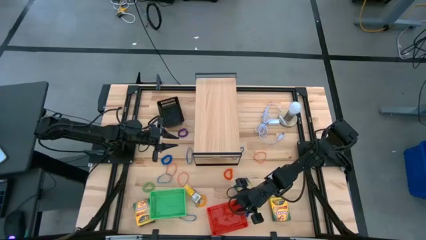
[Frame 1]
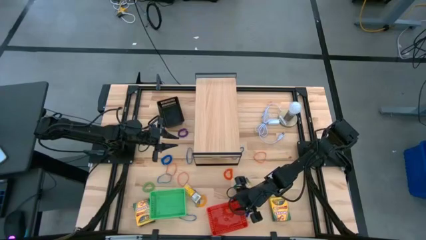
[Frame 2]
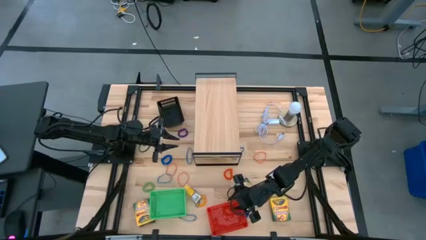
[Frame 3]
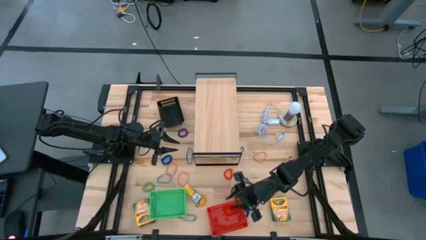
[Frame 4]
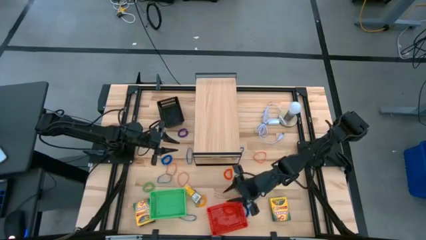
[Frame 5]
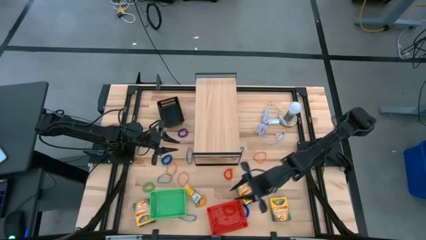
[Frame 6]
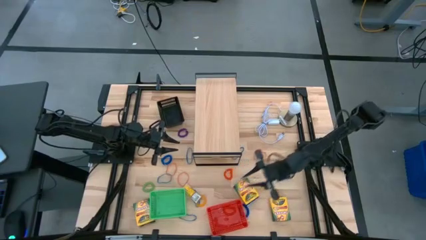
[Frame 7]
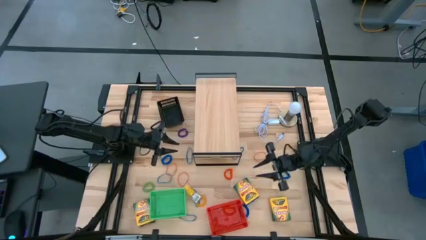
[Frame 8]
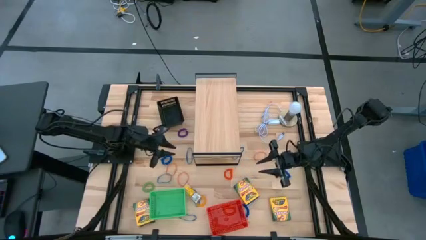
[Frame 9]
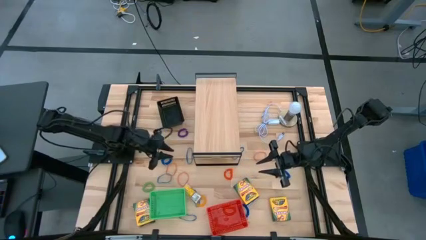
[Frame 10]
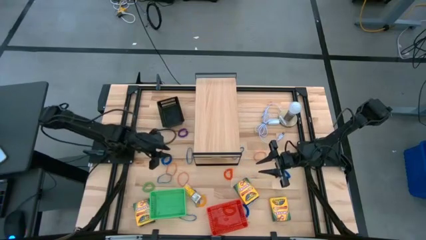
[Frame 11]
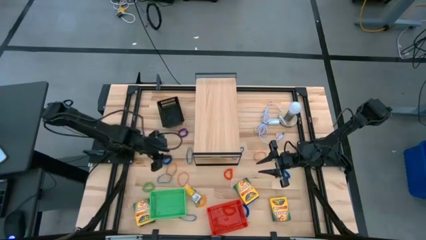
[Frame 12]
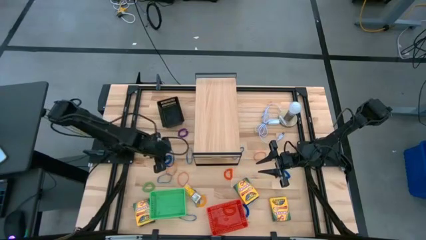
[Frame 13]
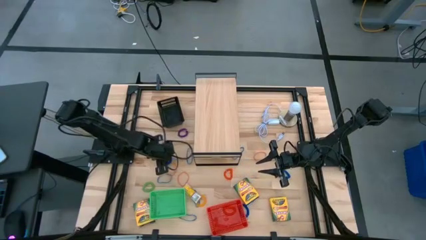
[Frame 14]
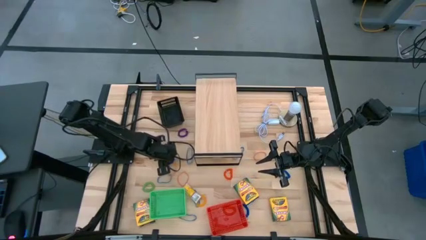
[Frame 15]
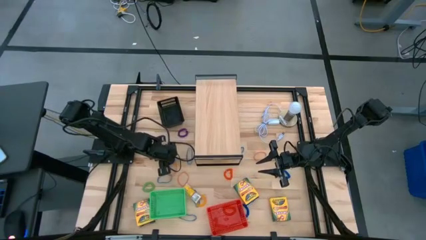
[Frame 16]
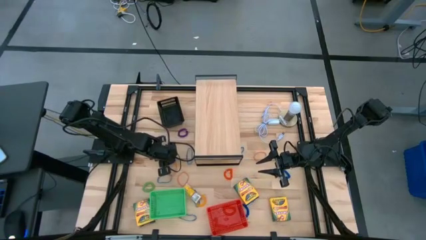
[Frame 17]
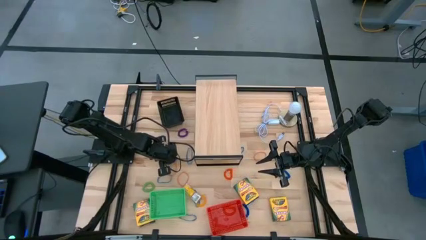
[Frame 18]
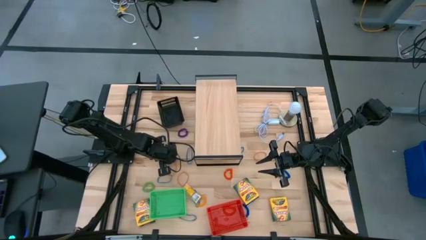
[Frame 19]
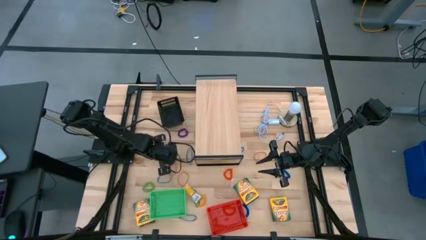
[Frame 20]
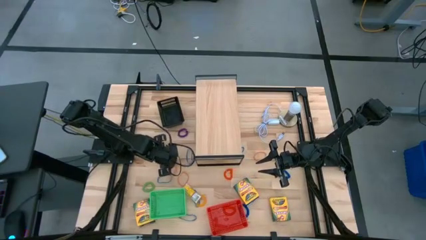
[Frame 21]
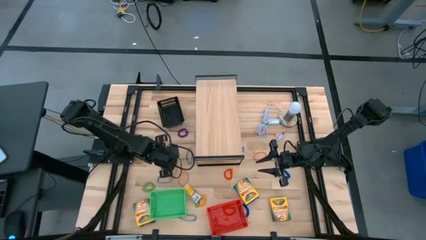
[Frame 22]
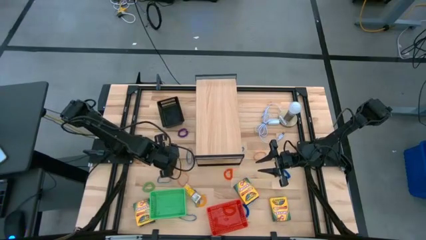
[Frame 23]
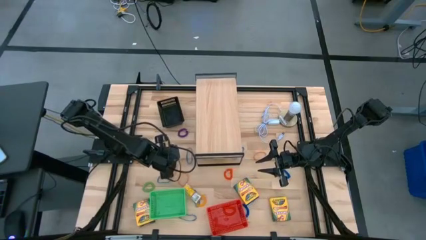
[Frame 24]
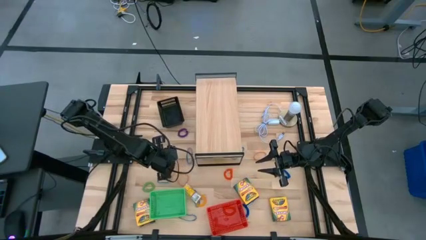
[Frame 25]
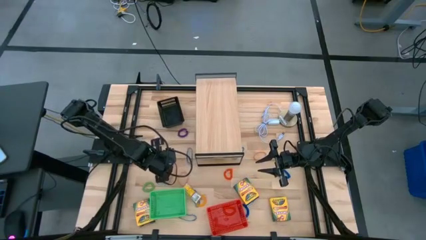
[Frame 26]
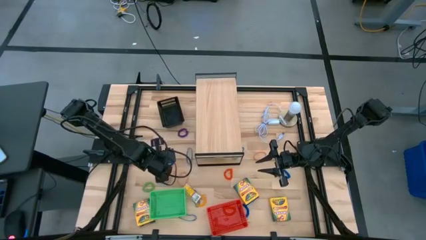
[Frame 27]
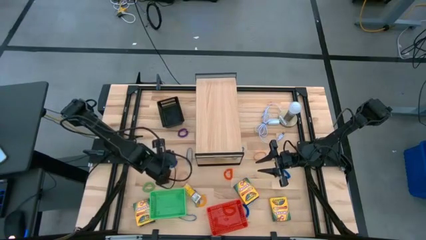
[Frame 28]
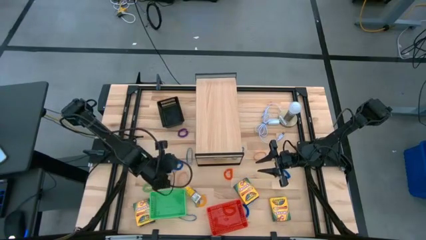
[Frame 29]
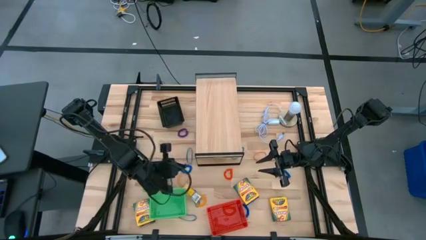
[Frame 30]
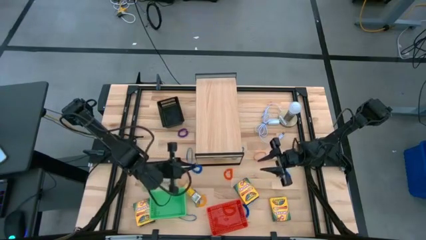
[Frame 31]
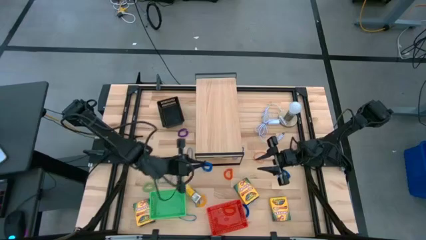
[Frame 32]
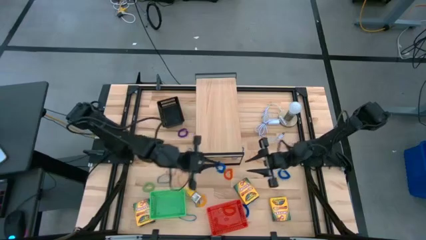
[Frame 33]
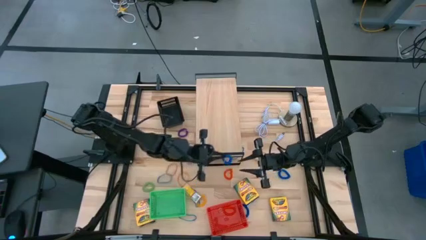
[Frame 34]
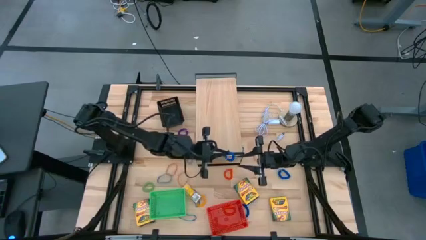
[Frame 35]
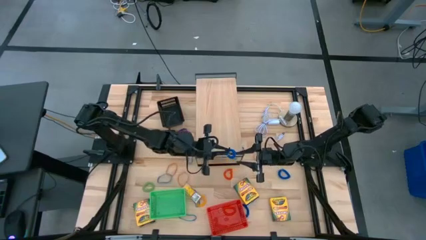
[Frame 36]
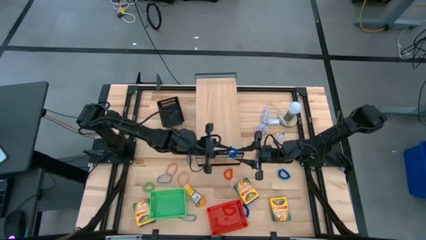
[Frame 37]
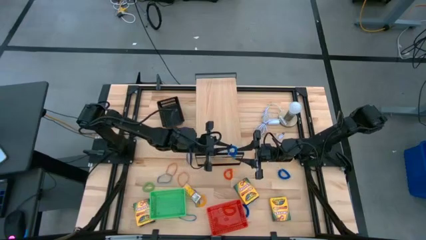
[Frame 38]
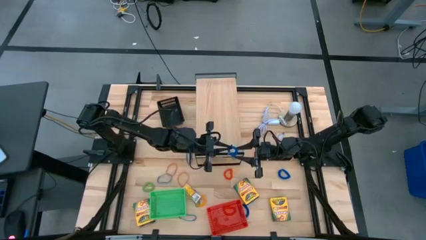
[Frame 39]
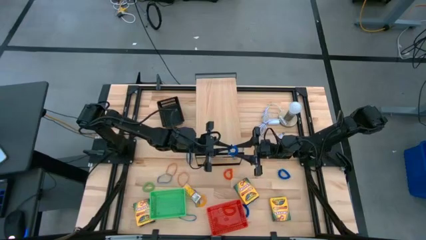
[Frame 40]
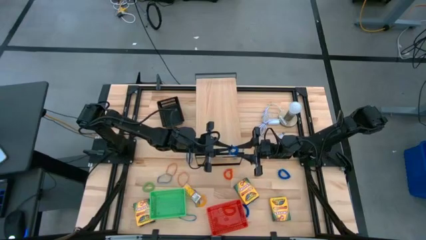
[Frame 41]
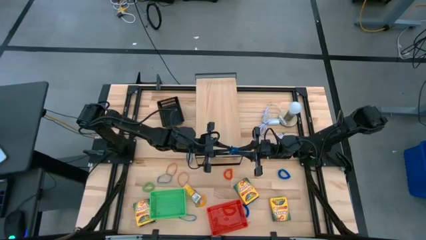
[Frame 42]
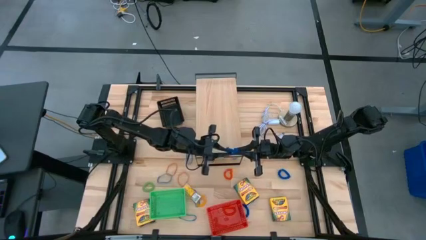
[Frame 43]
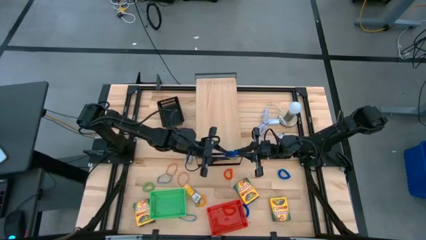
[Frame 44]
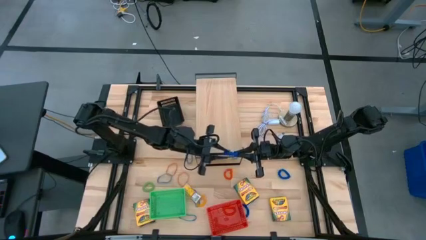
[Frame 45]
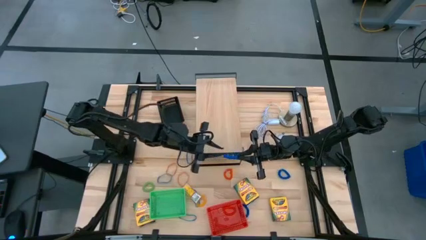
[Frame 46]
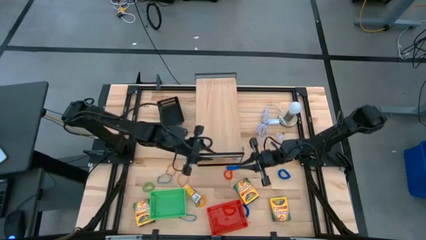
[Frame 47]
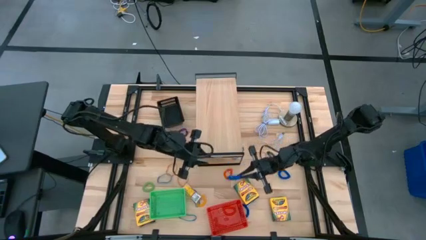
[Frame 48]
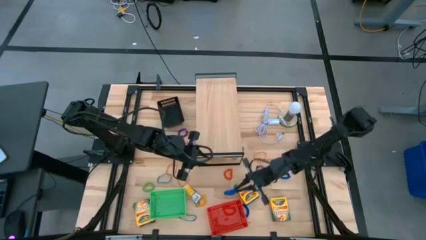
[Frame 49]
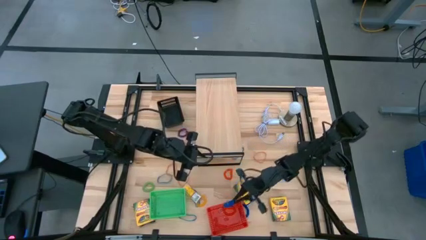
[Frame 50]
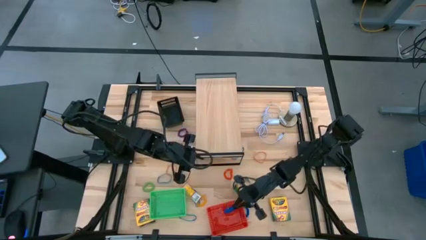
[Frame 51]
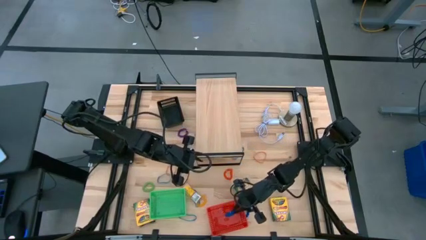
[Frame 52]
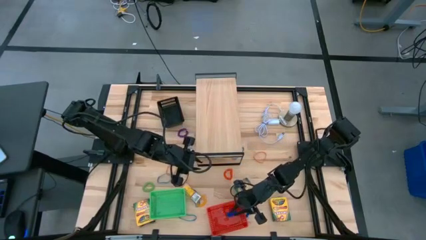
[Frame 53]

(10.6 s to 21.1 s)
Task: Pick & Place Office Desk Supplies
Put the blue spring keychain into the red basket

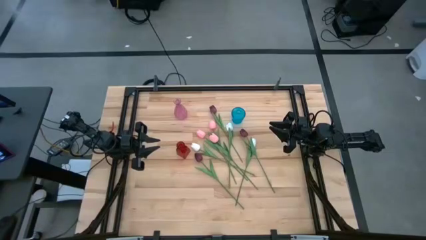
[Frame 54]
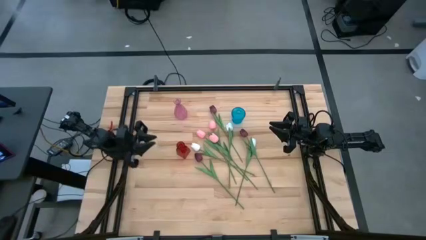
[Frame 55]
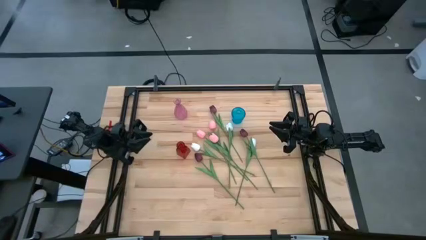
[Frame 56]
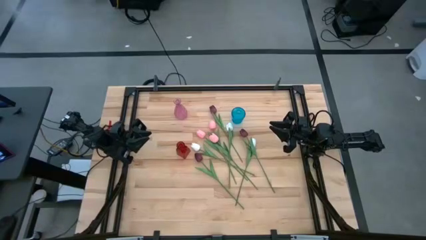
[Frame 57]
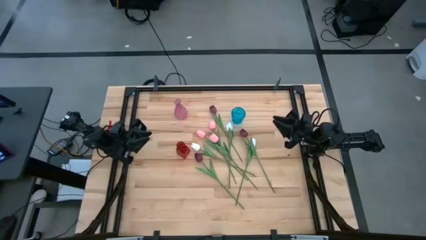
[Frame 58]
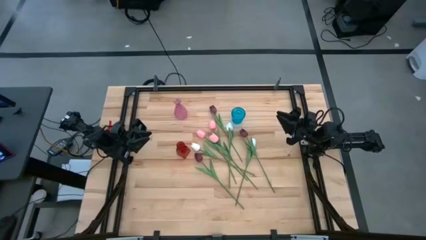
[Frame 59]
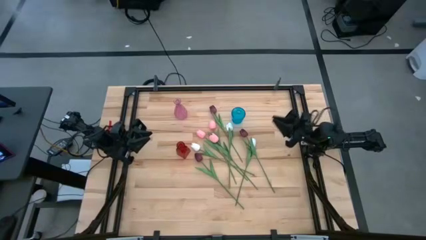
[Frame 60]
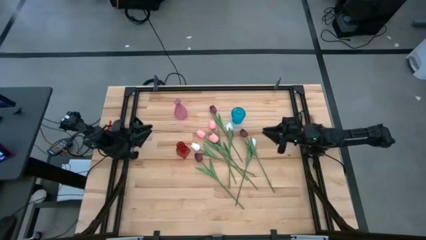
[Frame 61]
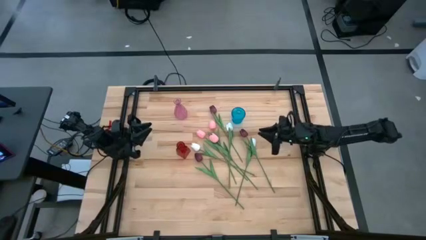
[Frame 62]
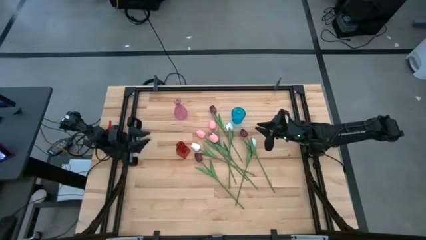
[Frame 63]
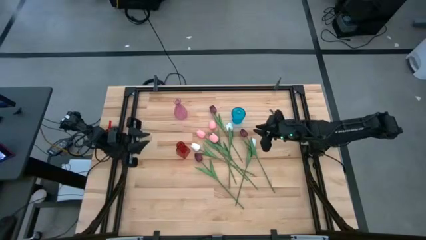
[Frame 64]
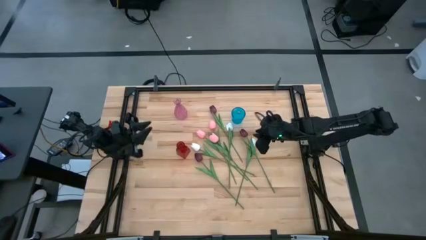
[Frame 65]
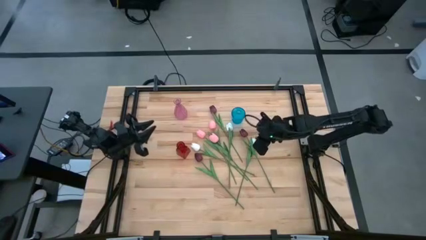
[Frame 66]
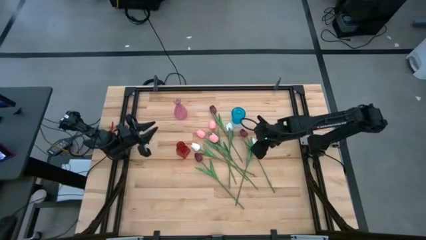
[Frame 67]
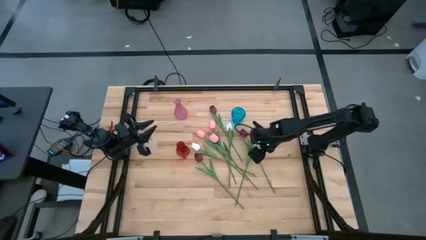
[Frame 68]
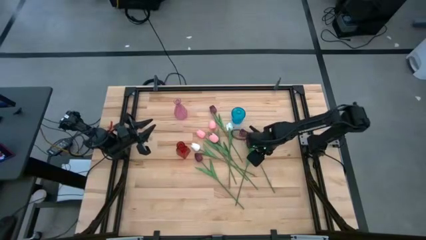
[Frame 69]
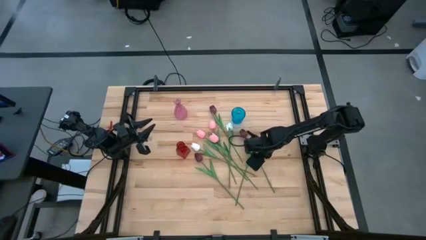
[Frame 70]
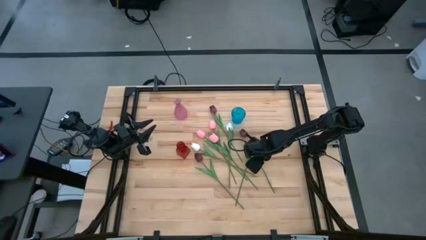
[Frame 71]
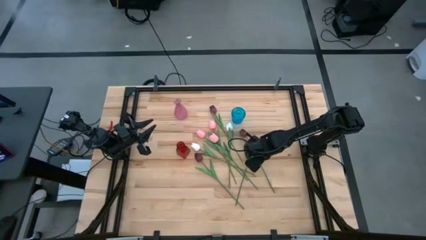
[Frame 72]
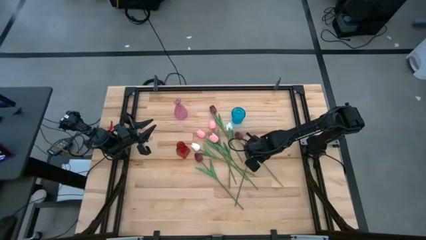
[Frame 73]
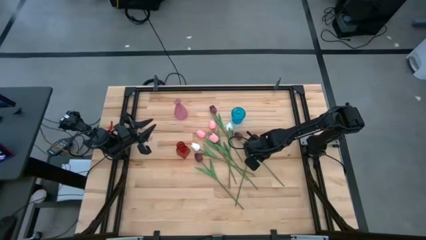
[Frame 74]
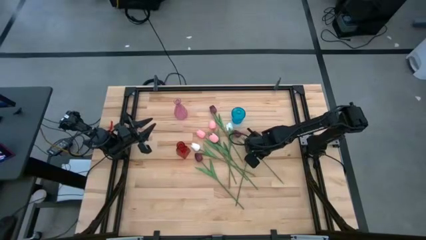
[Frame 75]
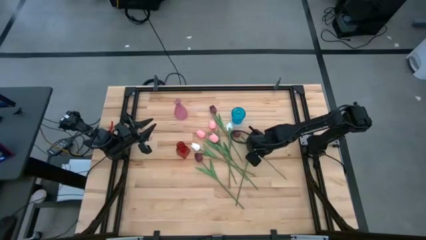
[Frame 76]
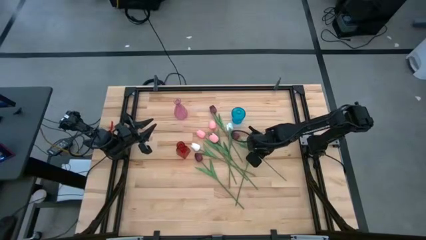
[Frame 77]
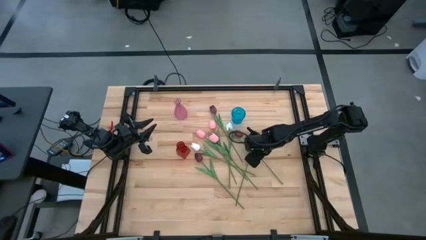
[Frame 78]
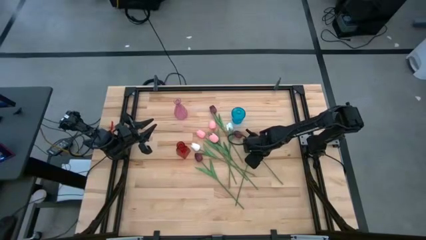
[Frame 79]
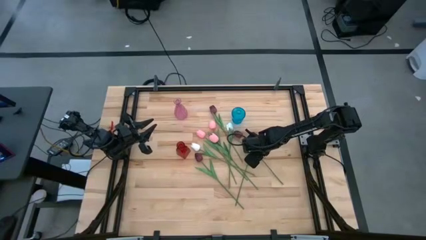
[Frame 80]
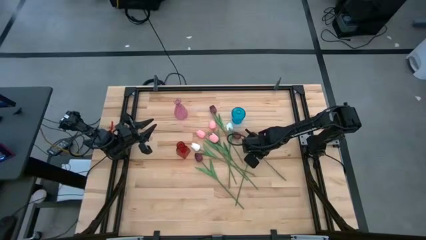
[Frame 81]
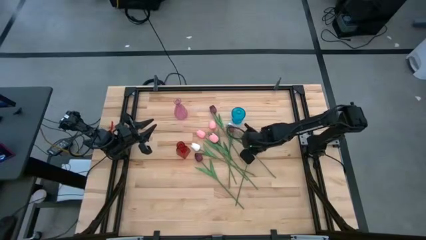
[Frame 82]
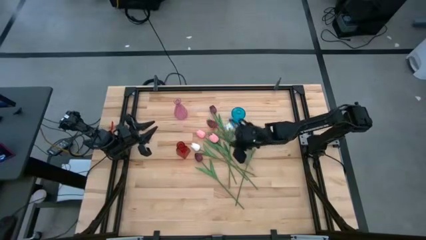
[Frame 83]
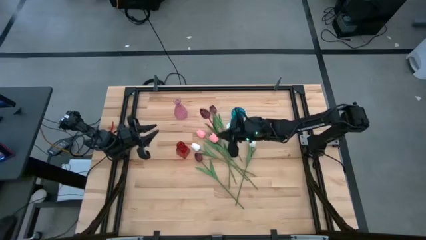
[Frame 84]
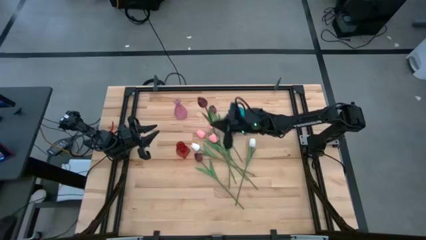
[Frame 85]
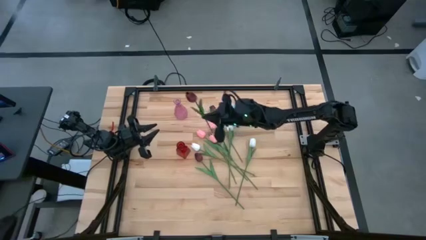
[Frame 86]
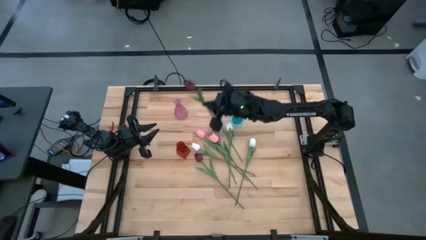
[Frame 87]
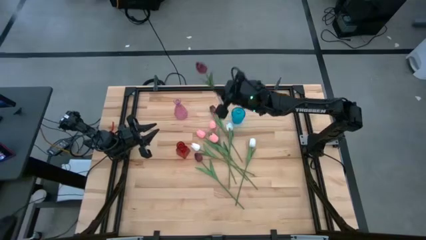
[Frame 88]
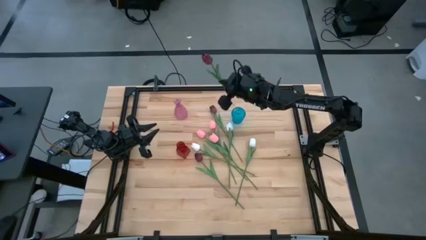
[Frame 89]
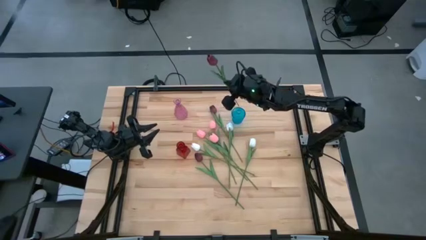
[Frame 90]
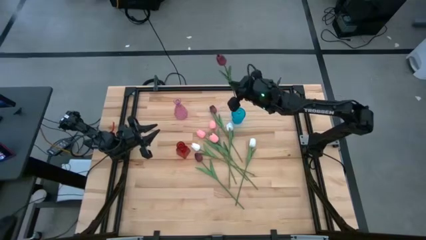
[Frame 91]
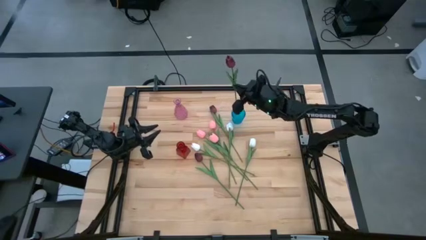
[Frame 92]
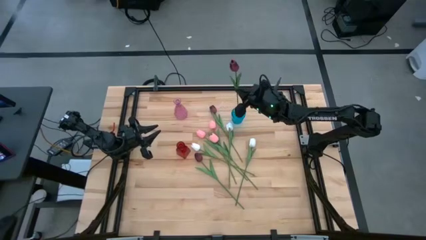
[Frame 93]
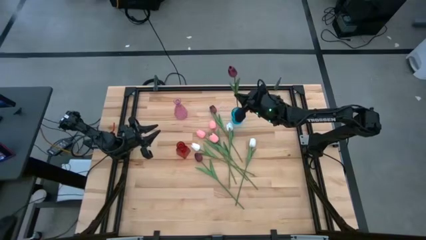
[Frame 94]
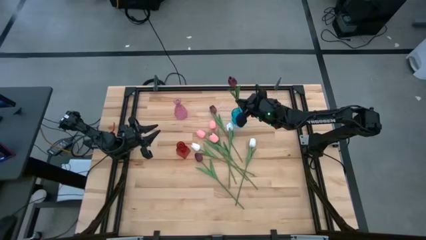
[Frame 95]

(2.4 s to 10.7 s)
Task: Sort flowers into vase by color
Put the right red flower into the blue vase
